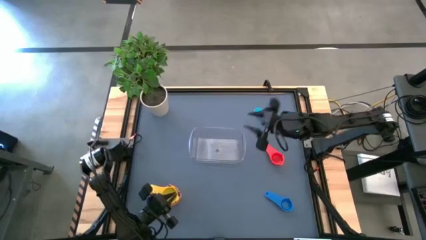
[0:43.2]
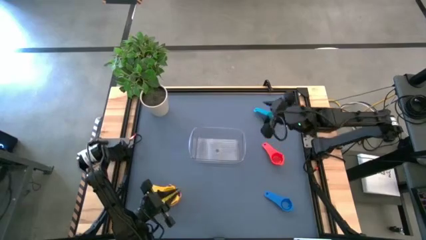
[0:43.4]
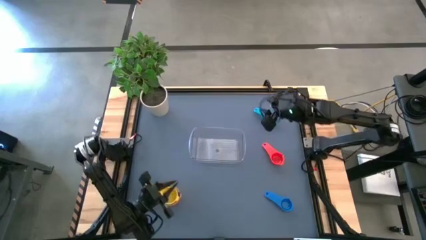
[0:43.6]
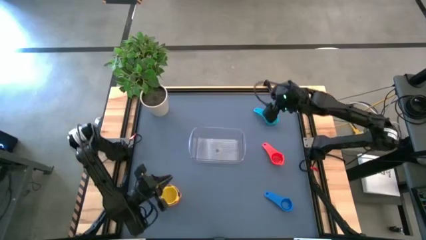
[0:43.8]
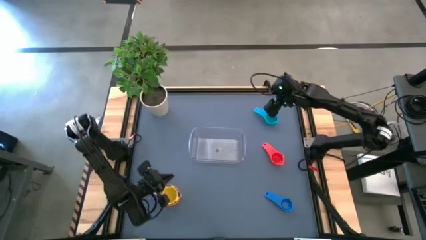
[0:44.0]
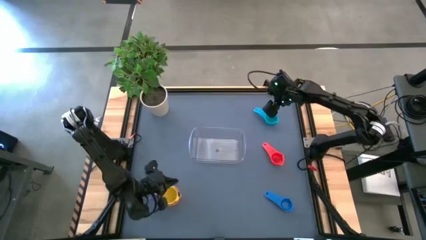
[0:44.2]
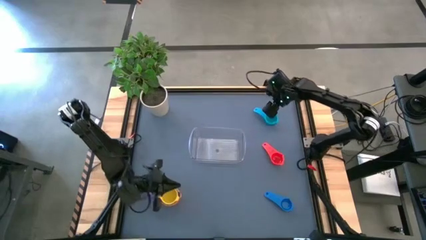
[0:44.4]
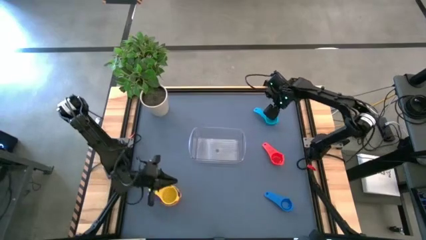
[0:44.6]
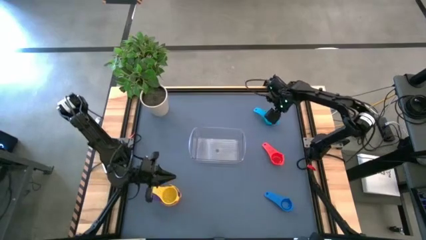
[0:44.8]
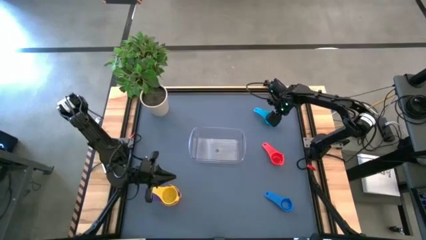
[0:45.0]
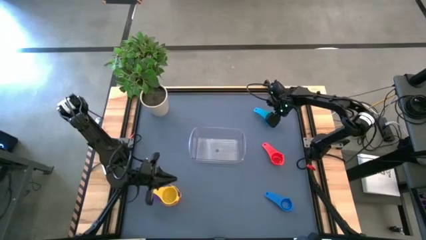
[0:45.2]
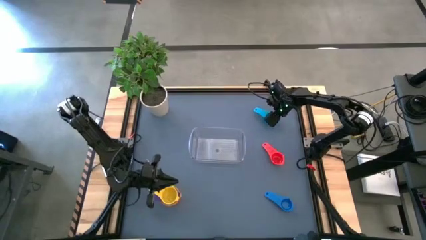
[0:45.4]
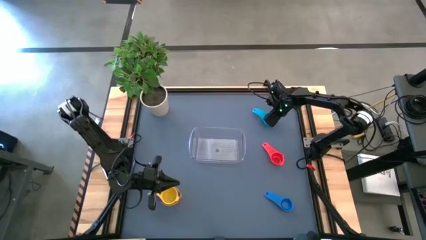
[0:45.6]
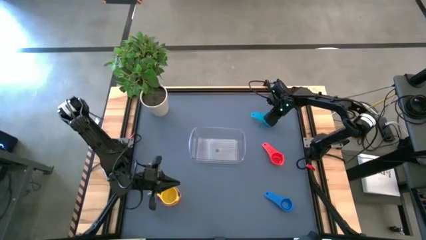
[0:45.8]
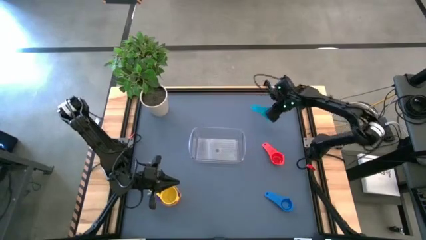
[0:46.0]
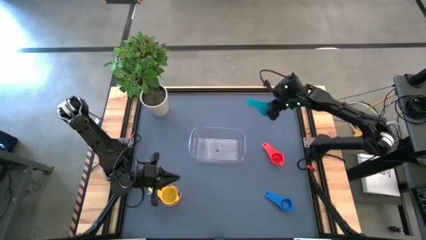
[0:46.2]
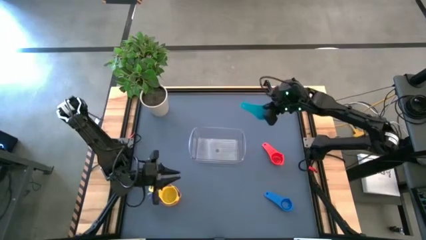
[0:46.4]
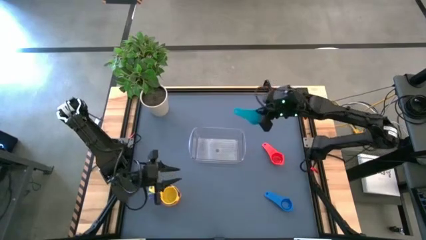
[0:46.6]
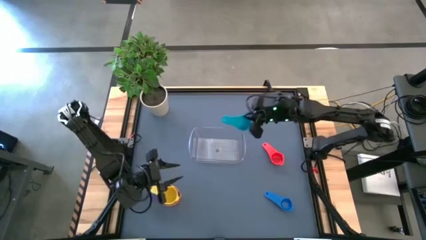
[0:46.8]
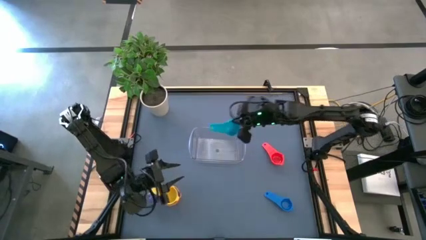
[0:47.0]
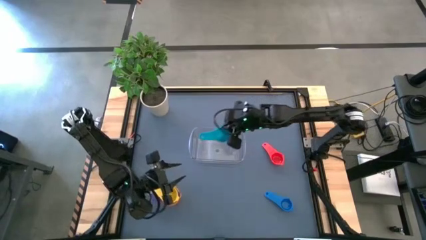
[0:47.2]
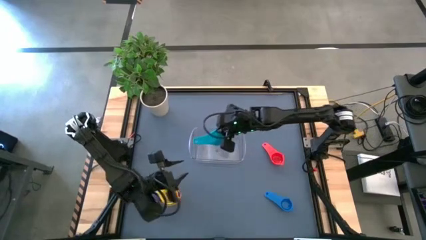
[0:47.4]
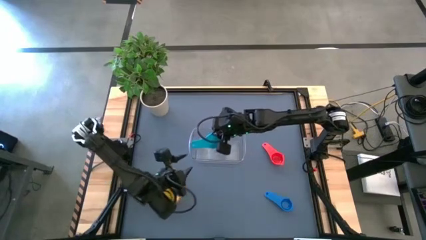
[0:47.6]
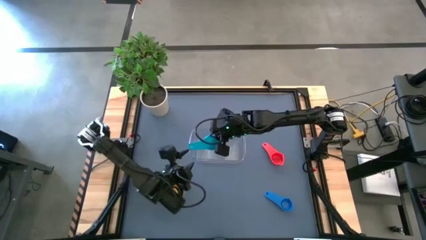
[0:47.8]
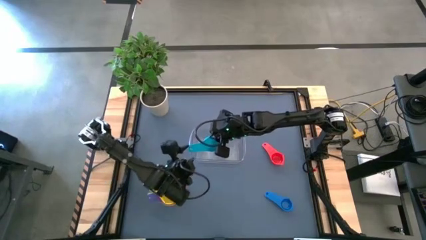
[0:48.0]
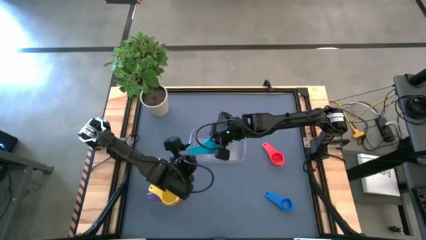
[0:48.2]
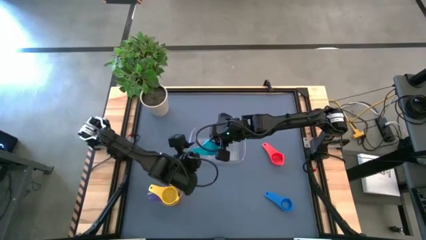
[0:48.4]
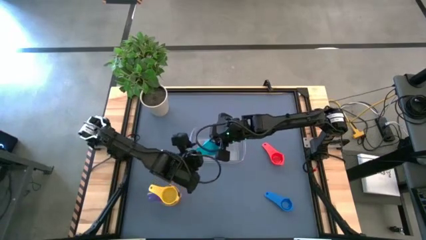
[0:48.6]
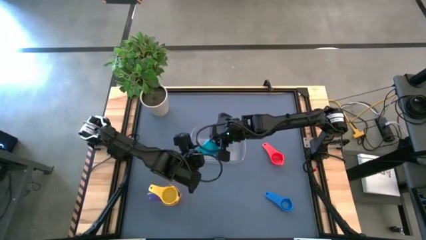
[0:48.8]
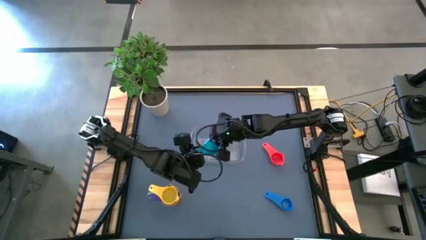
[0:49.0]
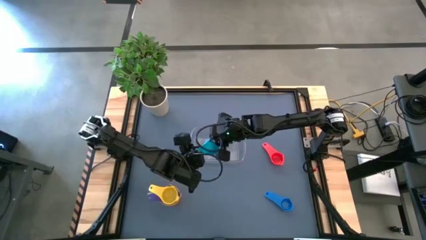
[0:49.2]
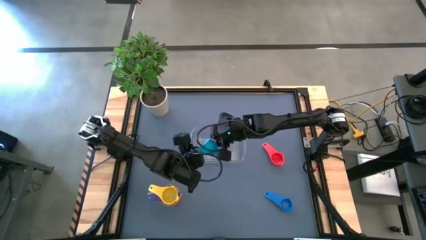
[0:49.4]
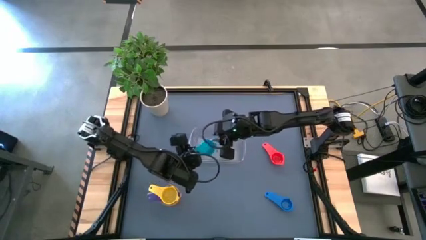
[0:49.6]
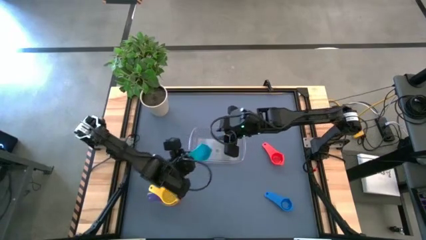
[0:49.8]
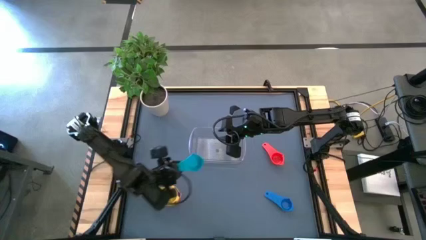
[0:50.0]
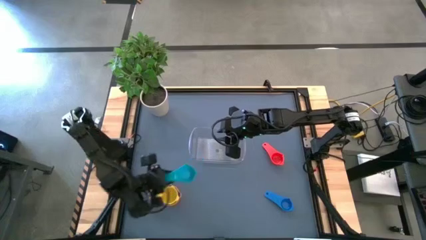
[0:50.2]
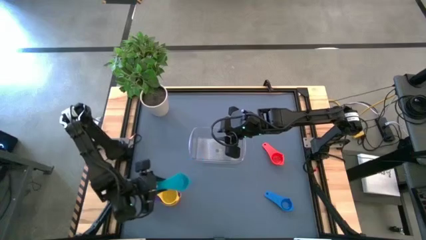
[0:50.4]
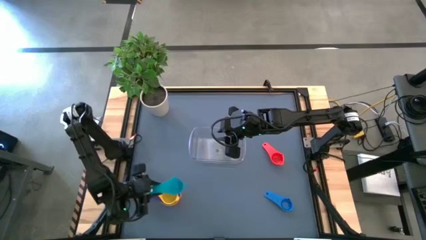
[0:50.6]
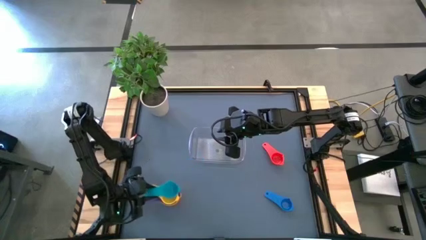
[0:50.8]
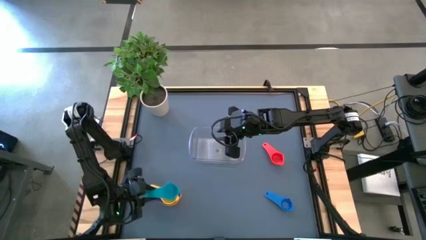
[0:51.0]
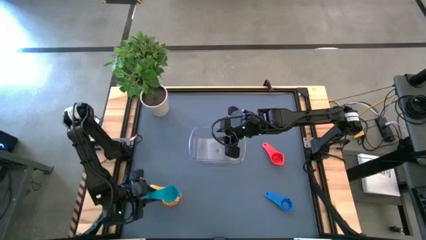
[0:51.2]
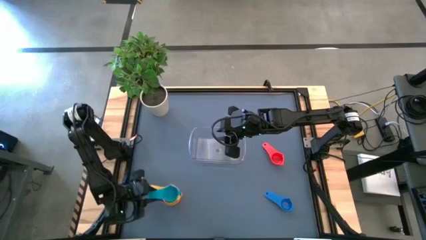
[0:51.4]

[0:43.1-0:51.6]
Task: Nest measuring cups in basket
Stack the light blue measuring cup on top of the yellow measuring cup

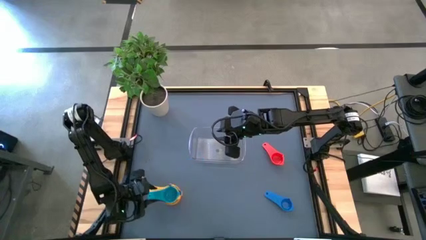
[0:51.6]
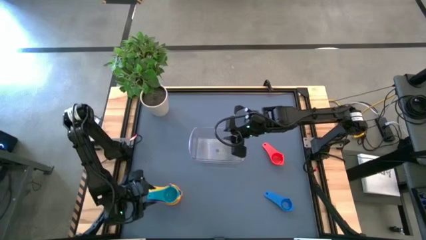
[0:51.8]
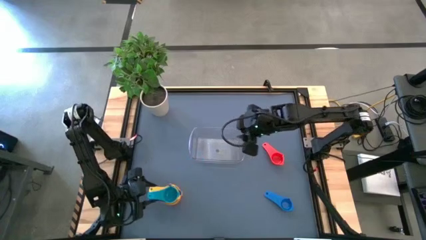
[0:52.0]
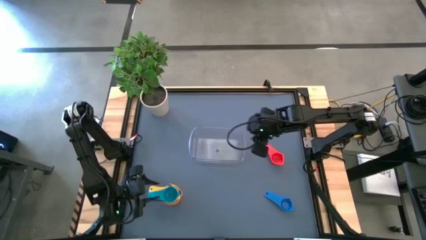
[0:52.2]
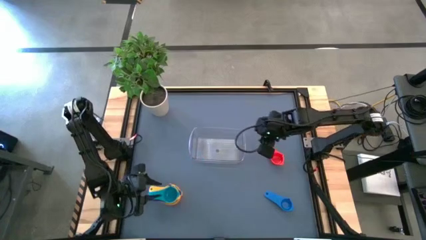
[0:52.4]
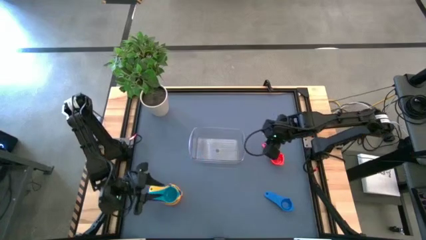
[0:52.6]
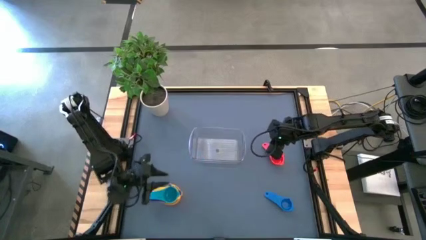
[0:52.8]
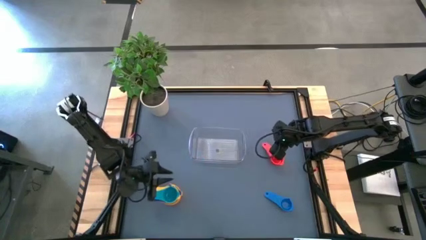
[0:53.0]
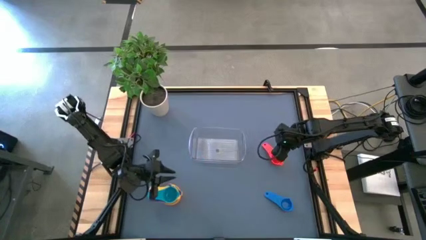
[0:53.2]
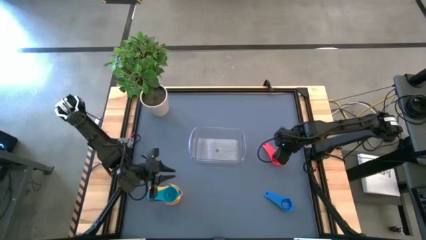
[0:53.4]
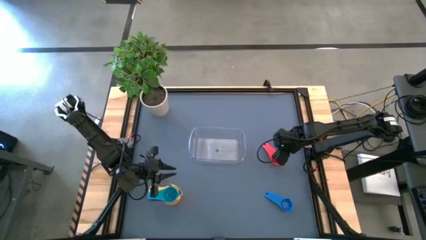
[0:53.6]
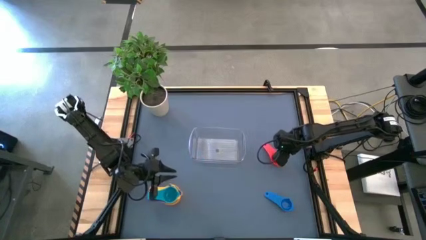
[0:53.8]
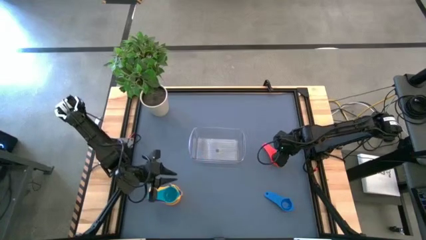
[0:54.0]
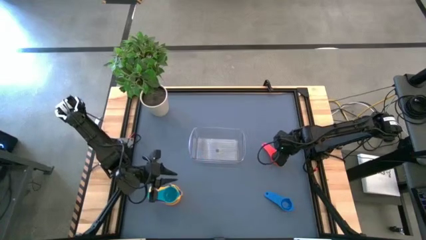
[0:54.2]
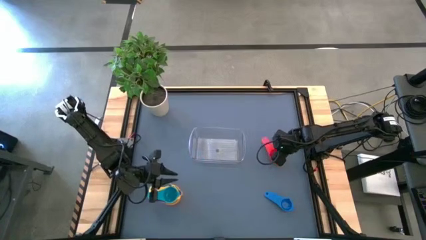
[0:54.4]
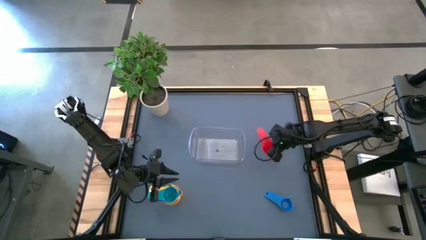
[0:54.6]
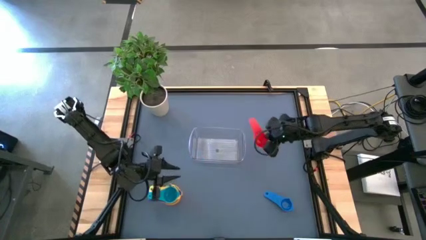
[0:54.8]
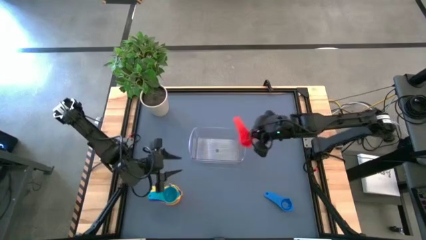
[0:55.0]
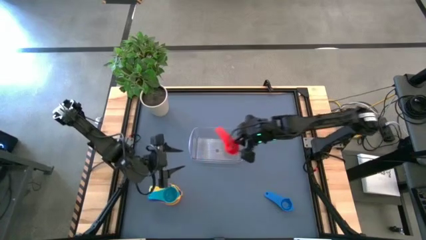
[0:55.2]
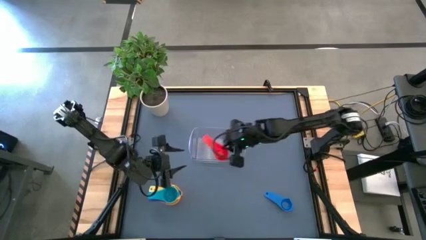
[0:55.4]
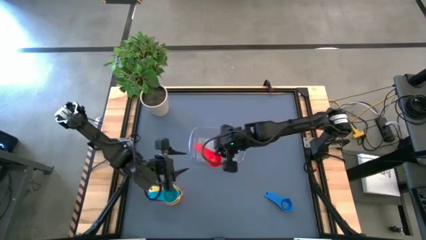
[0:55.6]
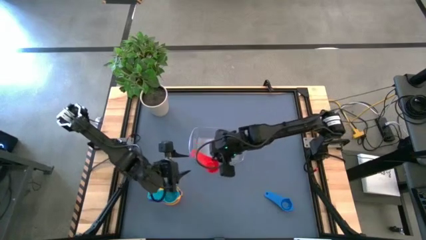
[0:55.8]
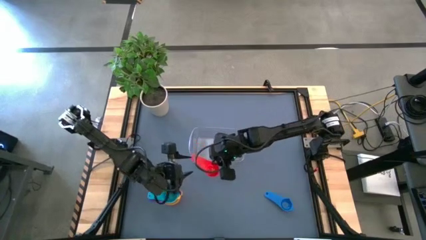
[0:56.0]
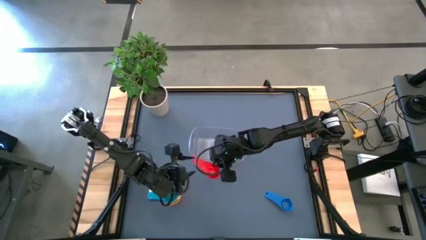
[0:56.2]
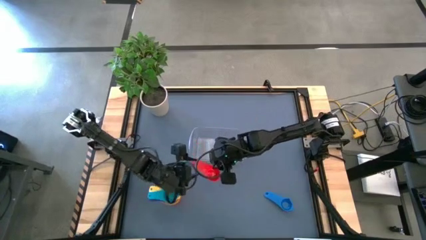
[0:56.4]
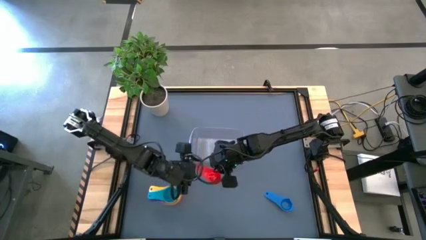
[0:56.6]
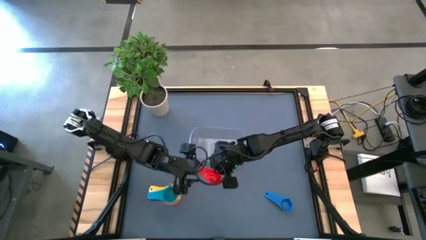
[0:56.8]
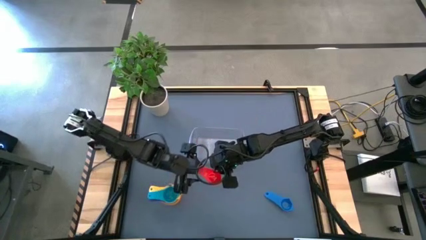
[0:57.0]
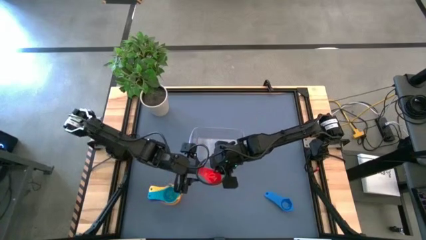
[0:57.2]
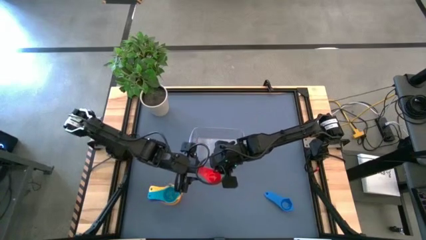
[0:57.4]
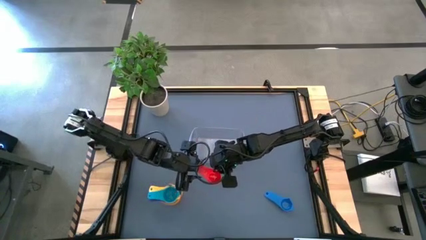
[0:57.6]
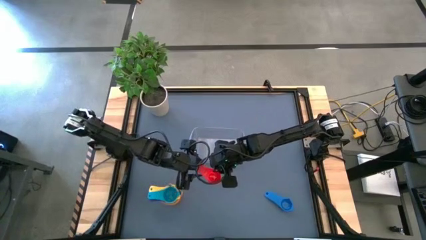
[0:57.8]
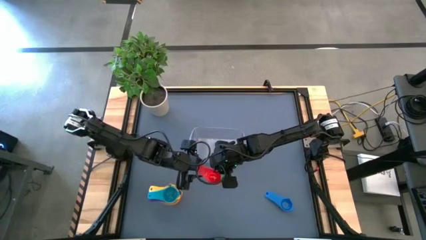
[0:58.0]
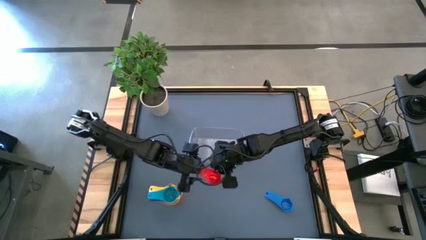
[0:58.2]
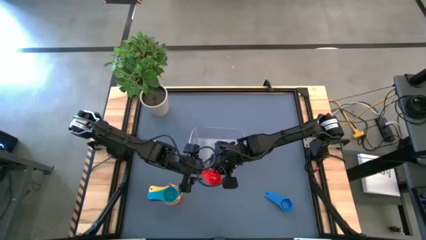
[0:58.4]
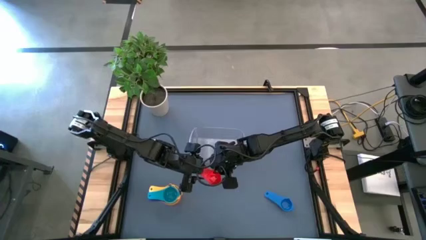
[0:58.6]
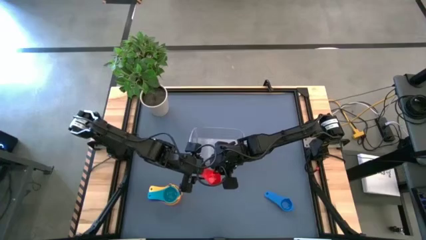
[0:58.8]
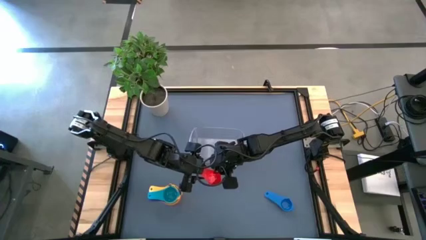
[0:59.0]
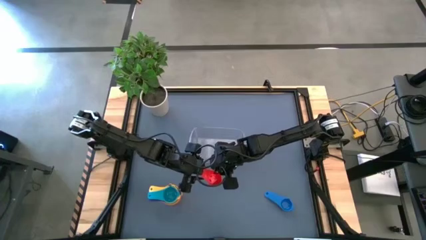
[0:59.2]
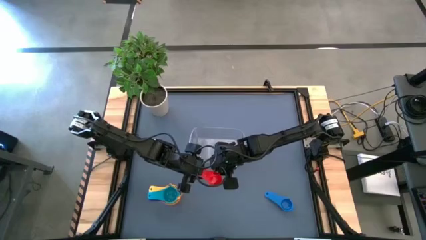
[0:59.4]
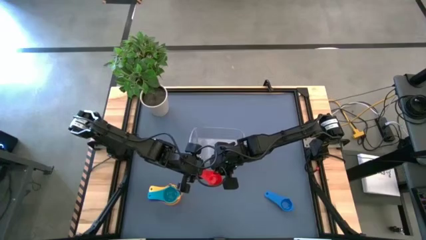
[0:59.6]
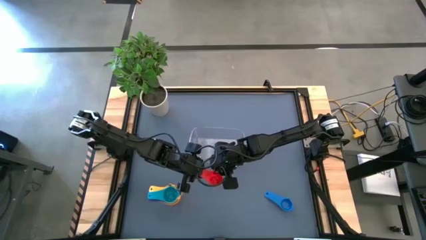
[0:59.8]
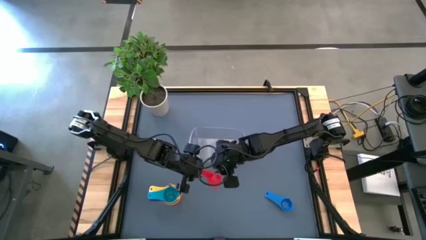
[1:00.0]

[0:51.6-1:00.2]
Stack the red measuring cup on top of the light blue measuring cup
